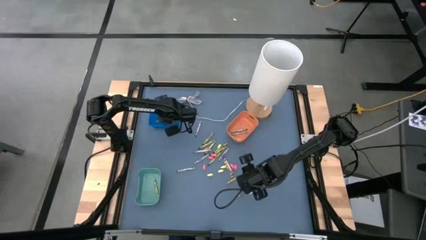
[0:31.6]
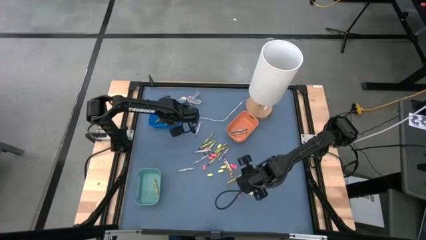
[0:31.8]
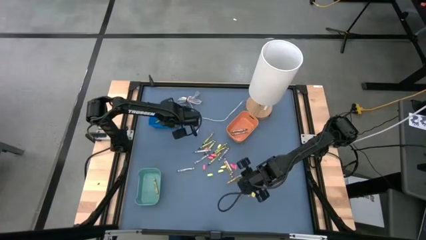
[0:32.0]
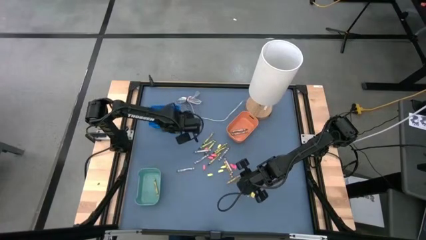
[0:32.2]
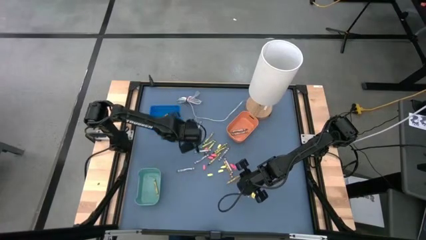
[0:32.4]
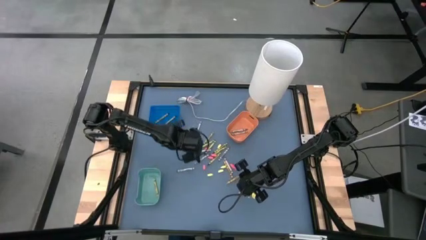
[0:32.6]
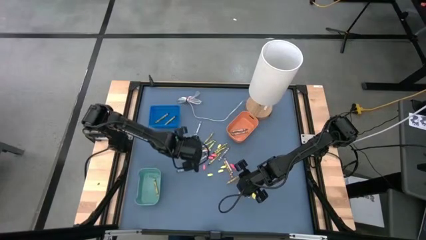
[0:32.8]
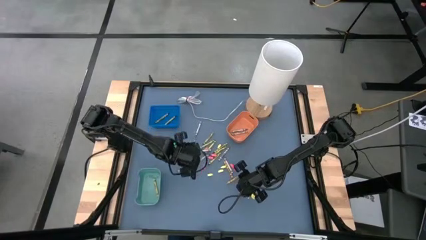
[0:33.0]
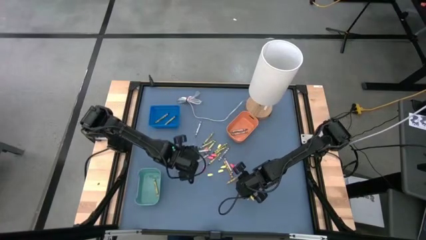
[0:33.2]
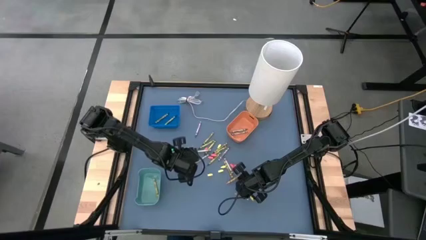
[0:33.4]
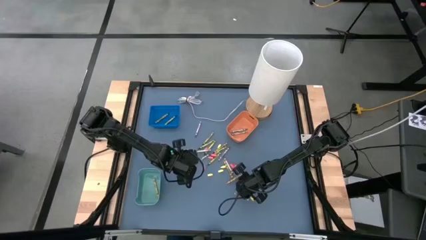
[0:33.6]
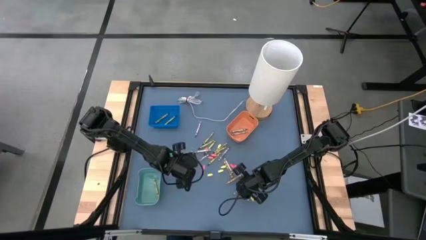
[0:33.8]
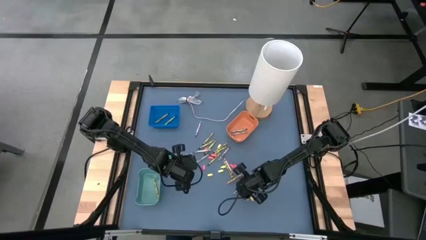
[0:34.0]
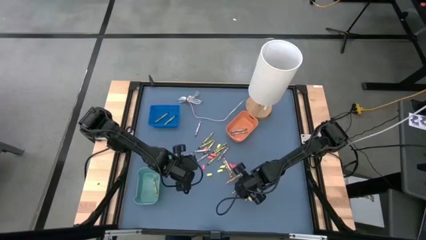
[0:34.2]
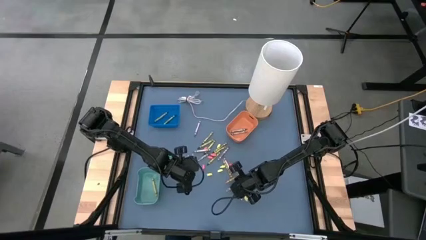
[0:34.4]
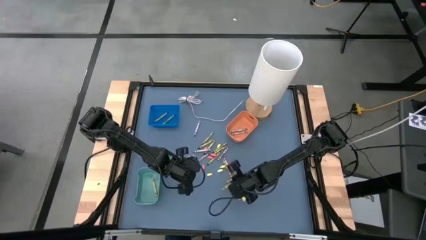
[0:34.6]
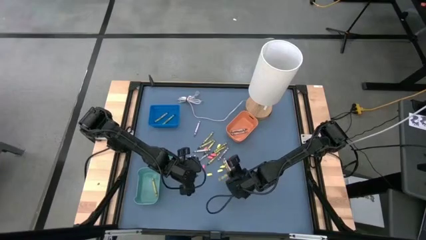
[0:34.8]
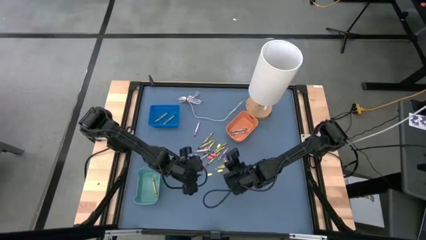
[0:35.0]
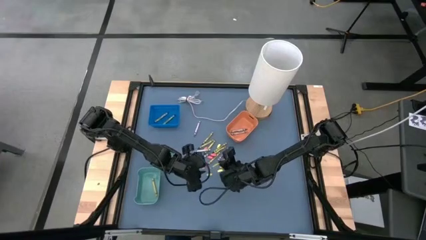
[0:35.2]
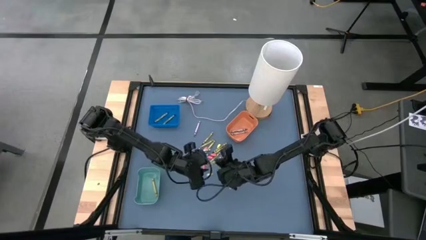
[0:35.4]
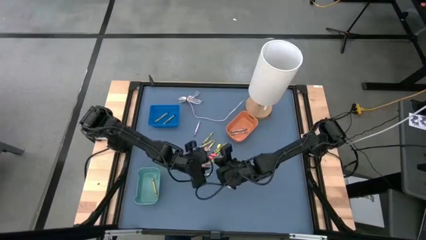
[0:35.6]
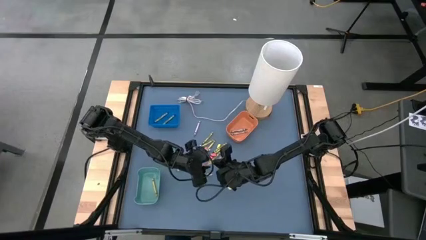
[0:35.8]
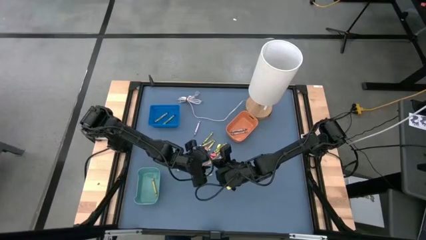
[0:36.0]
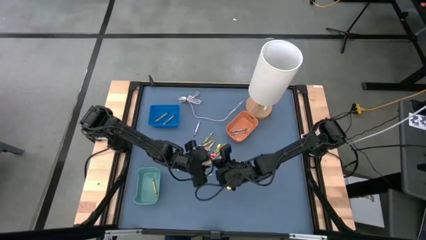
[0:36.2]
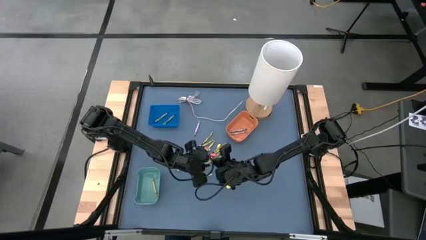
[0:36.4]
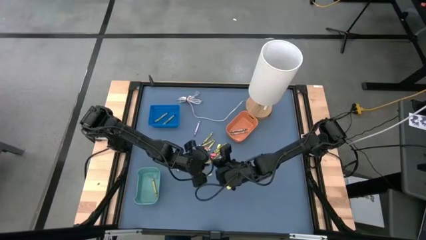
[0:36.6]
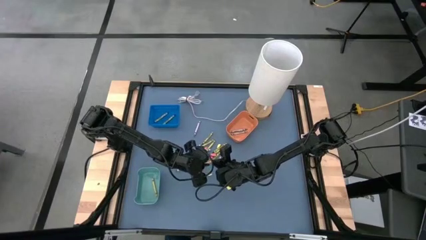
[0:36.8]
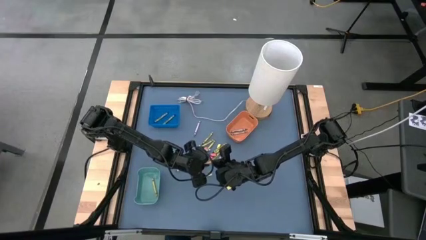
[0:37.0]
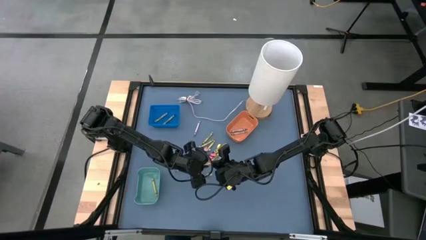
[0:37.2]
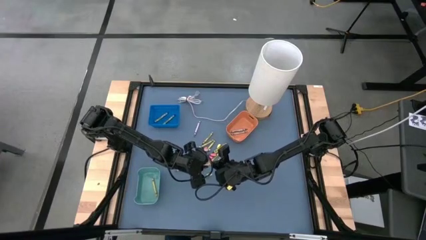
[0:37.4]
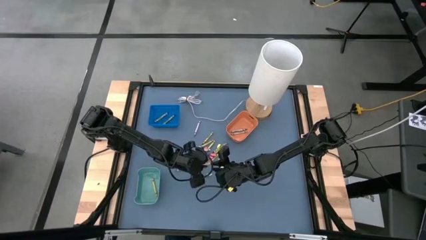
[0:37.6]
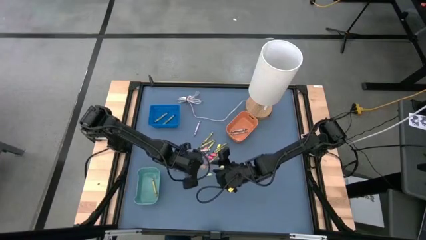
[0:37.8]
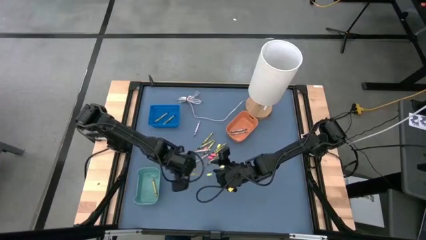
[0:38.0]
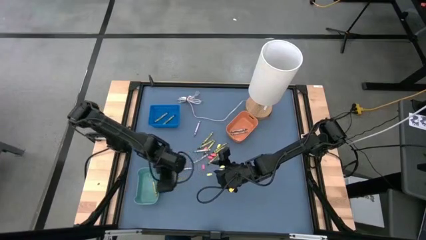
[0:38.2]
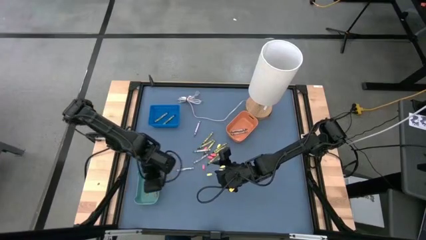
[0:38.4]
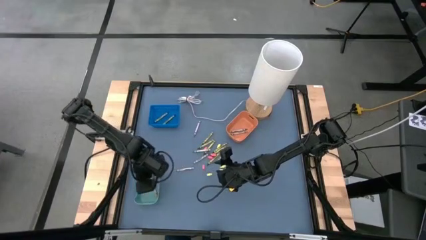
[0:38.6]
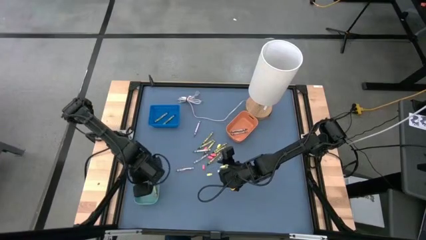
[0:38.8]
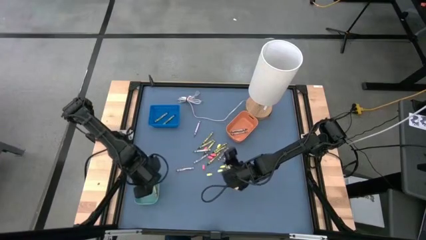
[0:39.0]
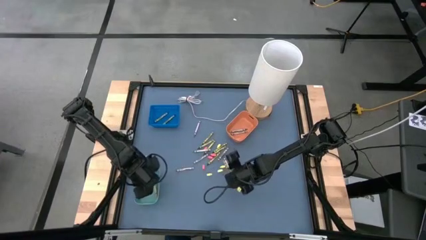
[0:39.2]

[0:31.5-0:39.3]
Task: Sort crayons
Put the yellow crayon into the green bin

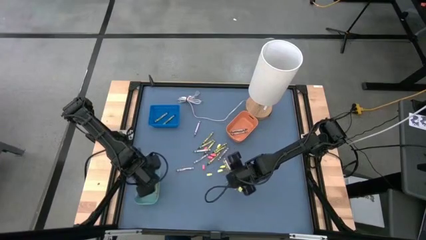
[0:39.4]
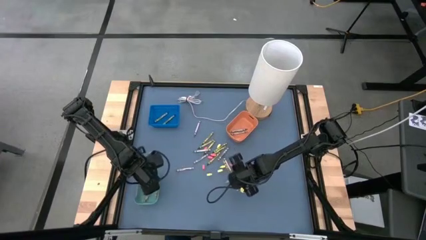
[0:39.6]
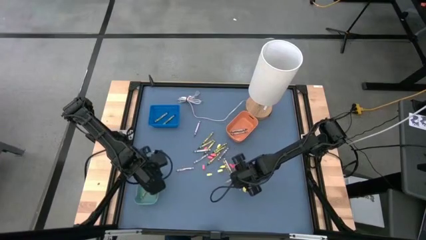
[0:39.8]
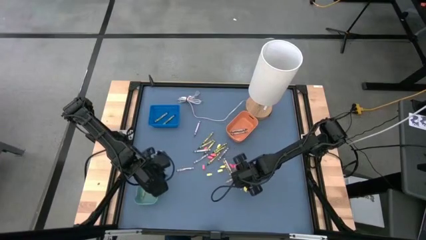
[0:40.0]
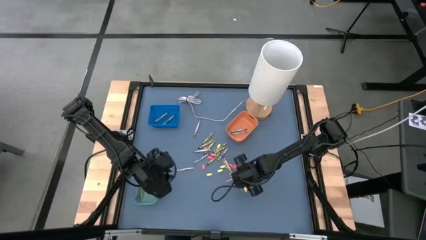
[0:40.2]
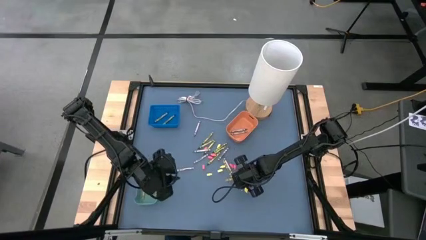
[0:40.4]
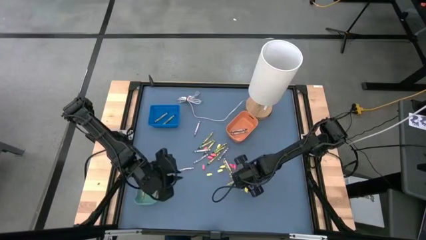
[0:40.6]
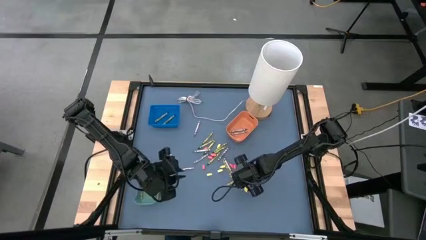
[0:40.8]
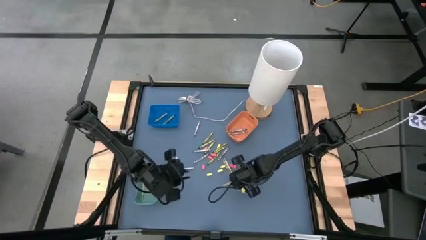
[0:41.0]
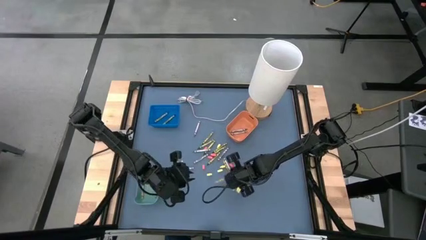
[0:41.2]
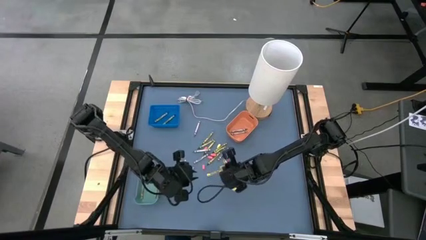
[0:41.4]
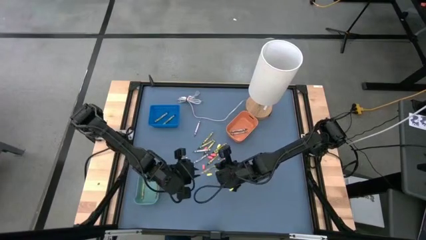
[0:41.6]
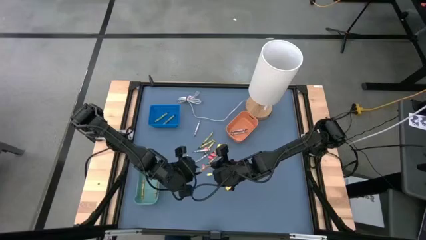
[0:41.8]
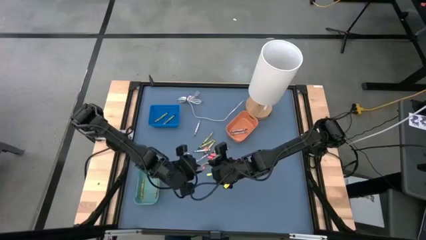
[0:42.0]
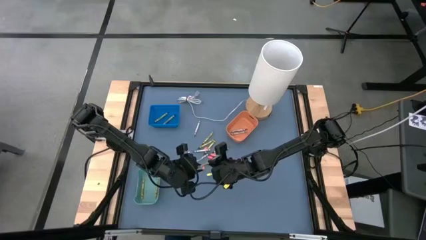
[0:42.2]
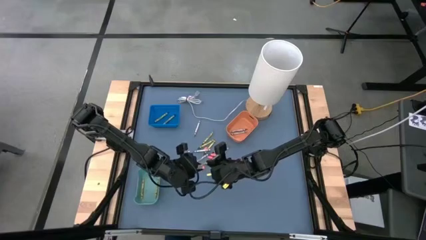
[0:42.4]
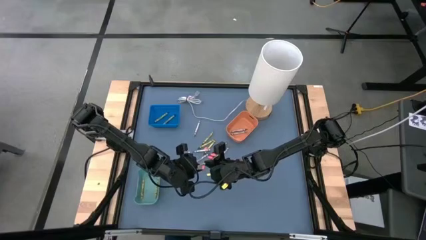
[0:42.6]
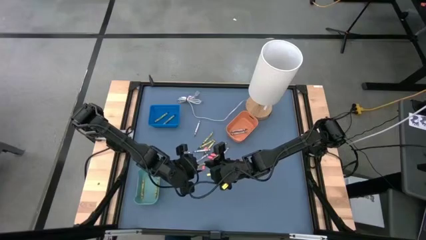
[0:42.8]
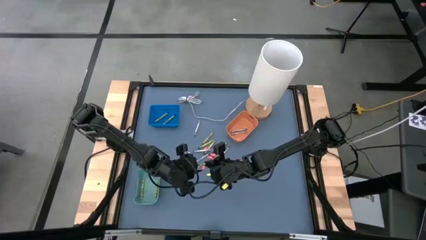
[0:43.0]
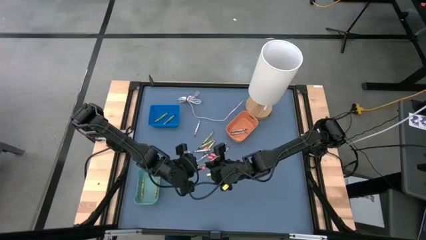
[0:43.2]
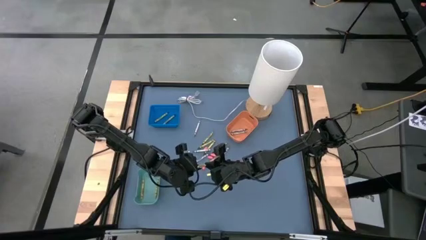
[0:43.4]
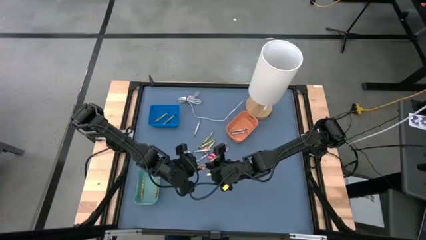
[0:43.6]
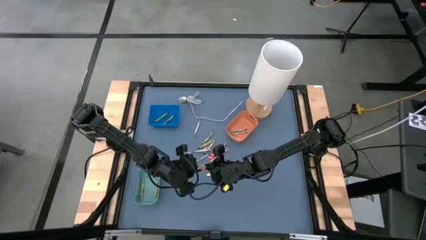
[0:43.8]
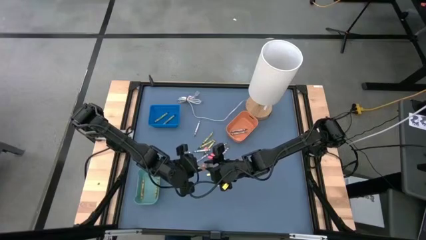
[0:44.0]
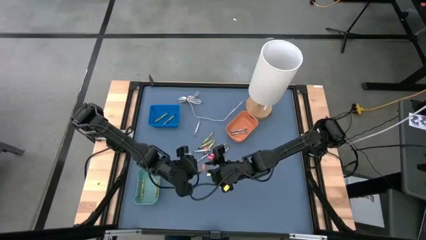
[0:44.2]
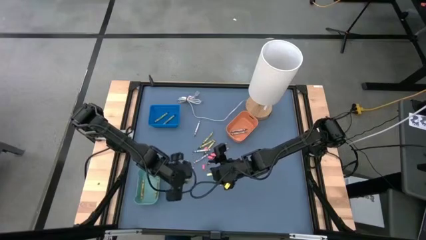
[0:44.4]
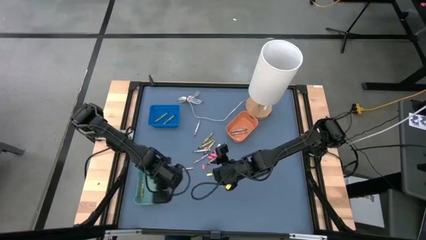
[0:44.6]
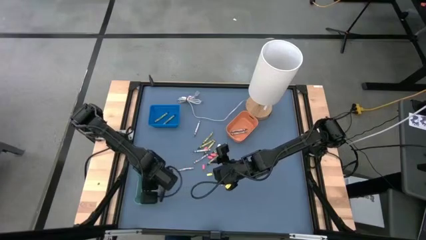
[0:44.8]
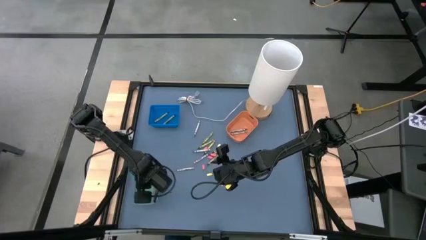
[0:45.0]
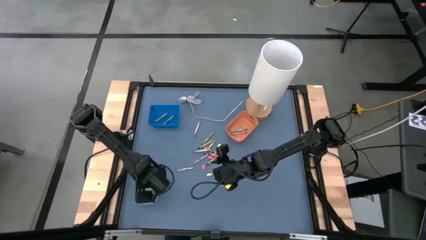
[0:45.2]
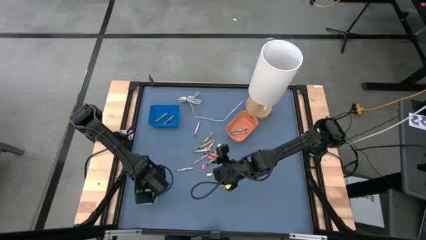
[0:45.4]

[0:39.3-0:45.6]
Put the yellow crayon into the green bin

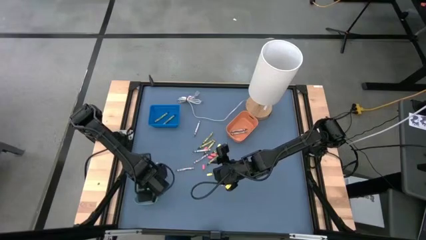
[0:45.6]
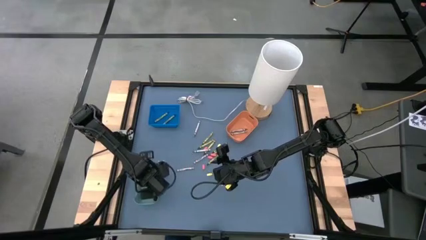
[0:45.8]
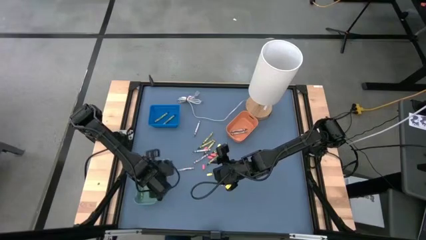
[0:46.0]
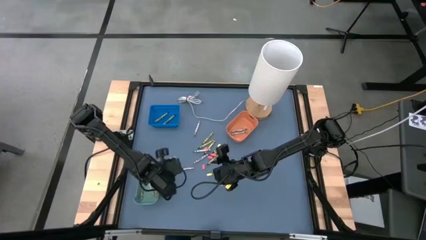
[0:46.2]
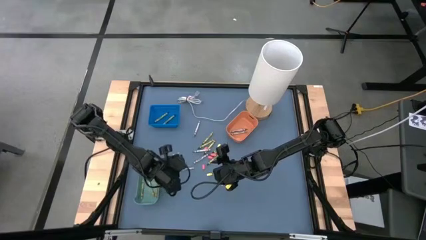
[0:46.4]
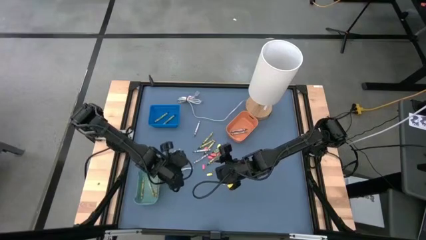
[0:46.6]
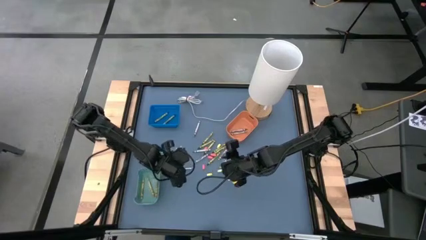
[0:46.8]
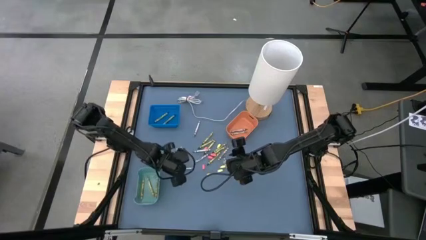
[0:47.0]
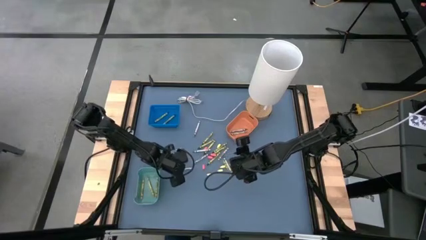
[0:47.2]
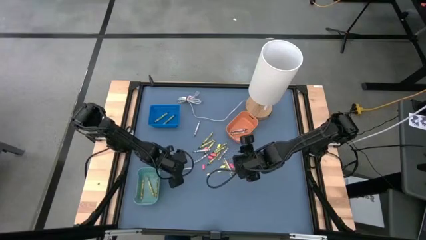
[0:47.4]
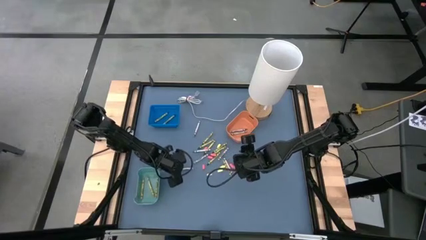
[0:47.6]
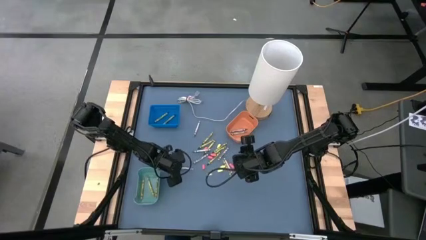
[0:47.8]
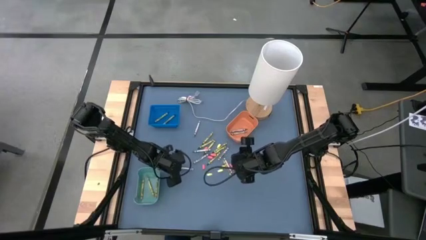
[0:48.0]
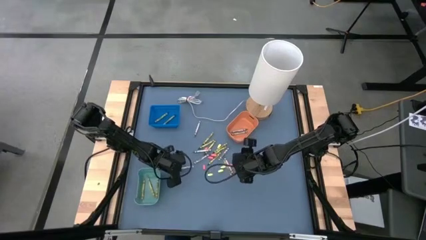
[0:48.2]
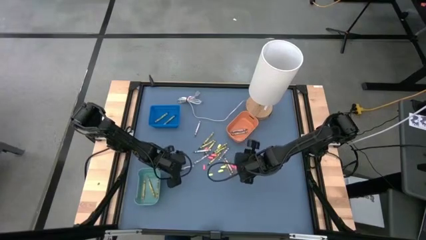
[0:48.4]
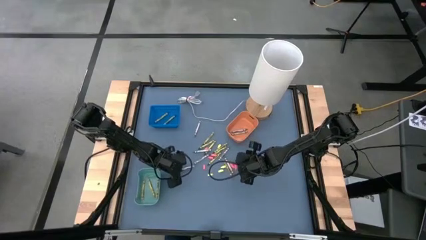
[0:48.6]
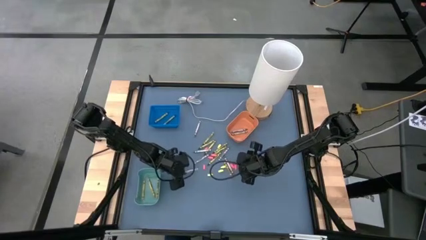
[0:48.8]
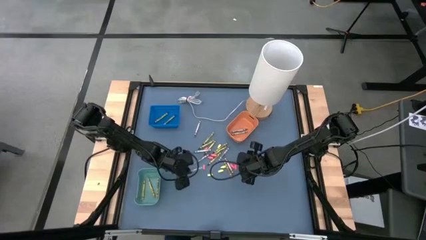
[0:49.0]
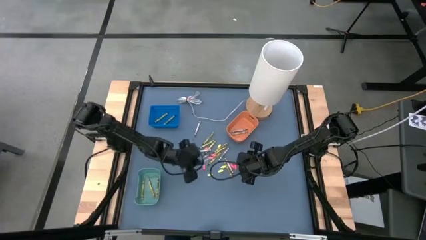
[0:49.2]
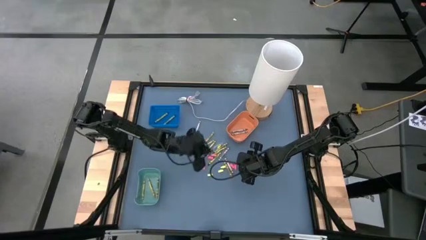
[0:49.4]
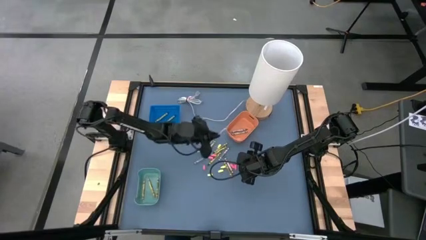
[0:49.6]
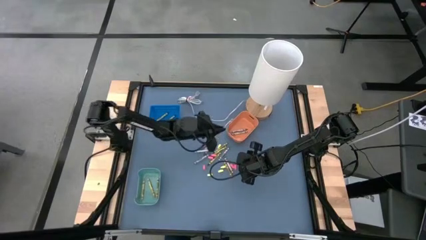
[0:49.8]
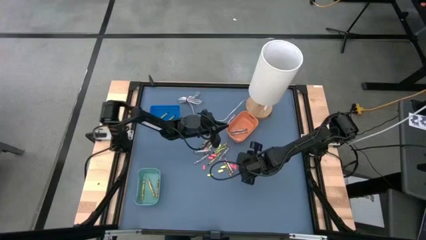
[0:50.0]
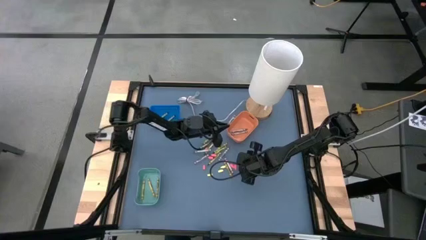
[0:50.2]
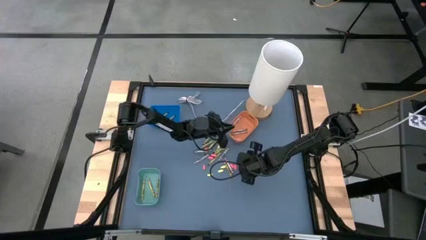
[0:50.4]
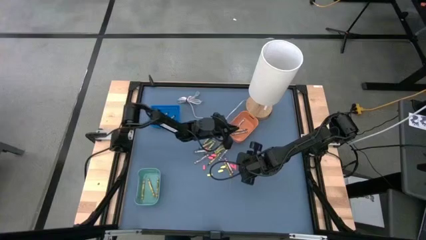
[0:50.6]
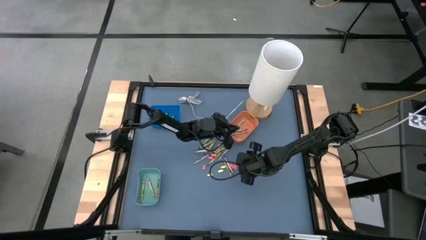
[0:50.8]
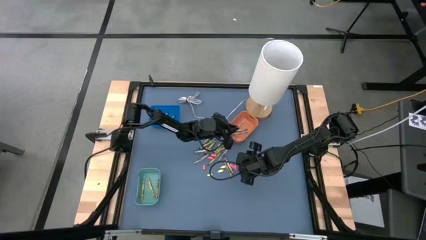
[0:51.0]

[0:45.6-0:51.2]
Put the gray crayon into the orange bin
